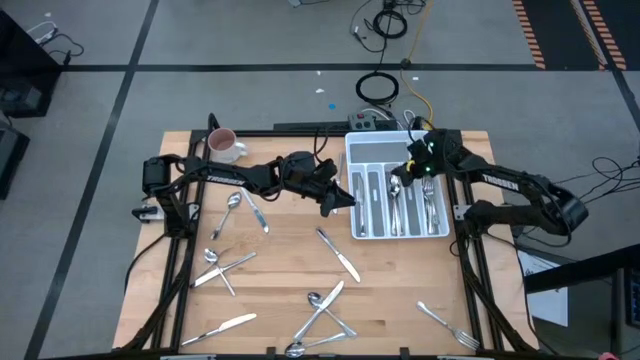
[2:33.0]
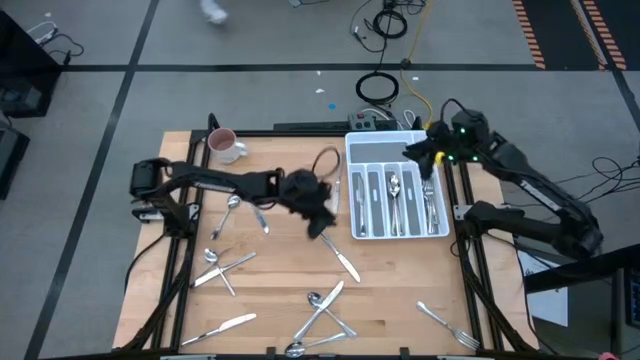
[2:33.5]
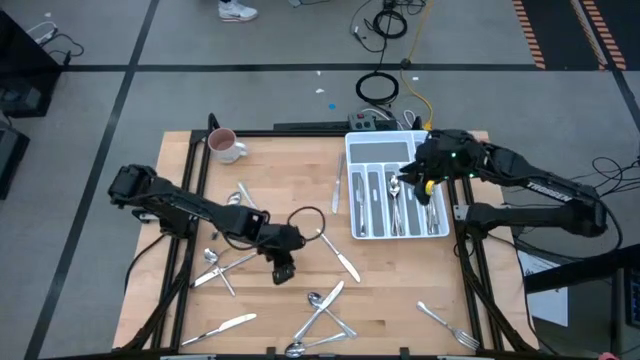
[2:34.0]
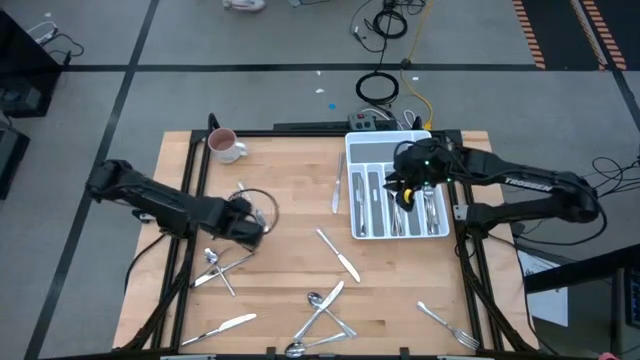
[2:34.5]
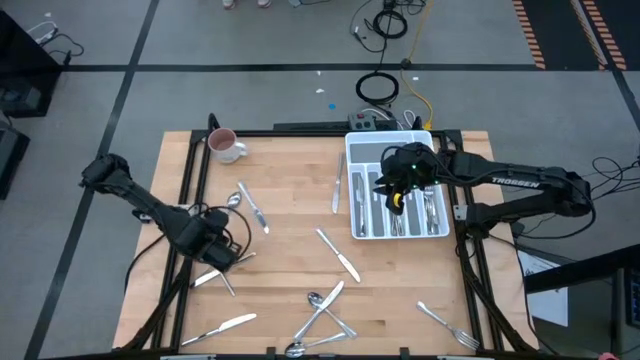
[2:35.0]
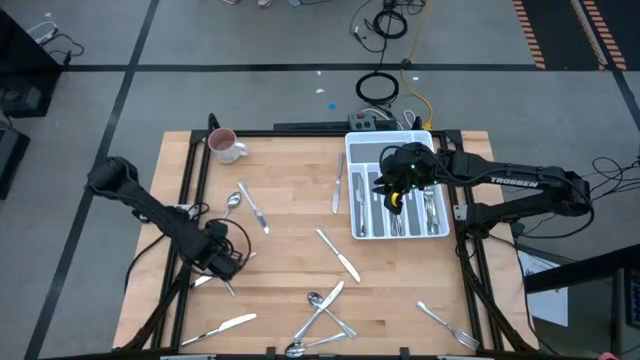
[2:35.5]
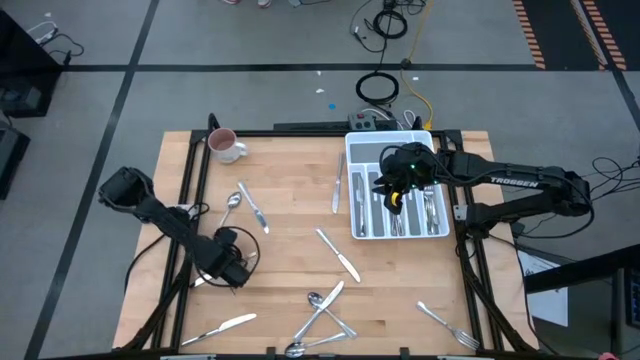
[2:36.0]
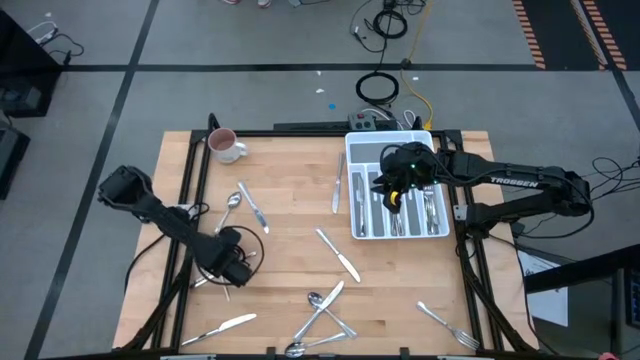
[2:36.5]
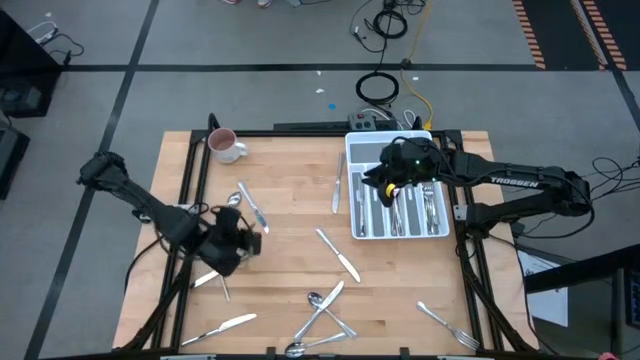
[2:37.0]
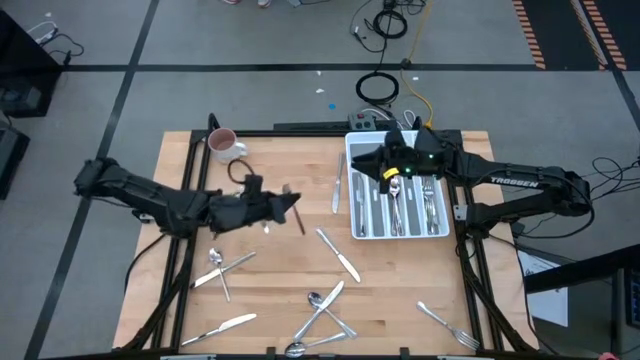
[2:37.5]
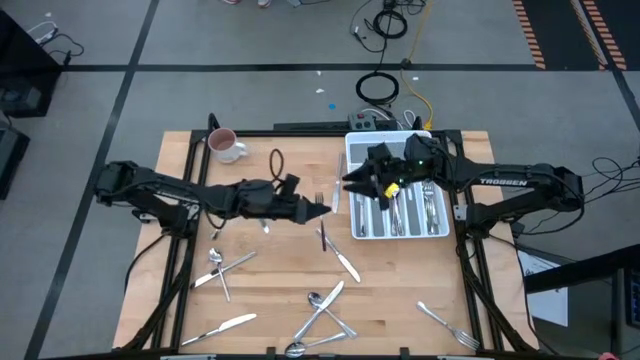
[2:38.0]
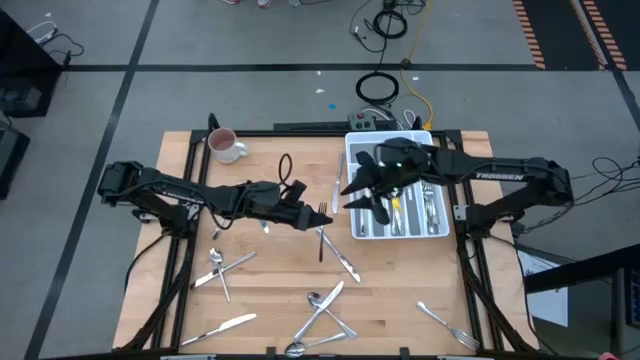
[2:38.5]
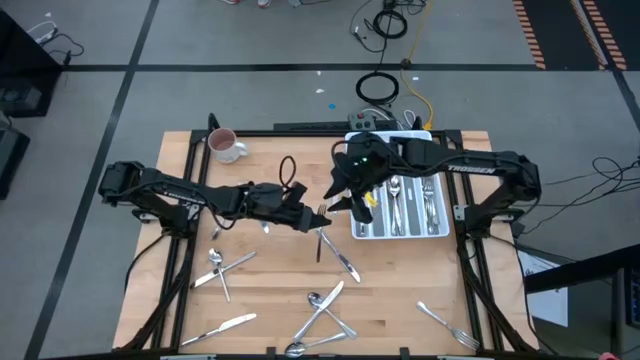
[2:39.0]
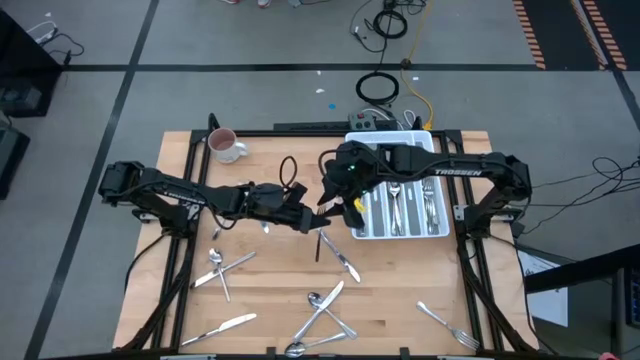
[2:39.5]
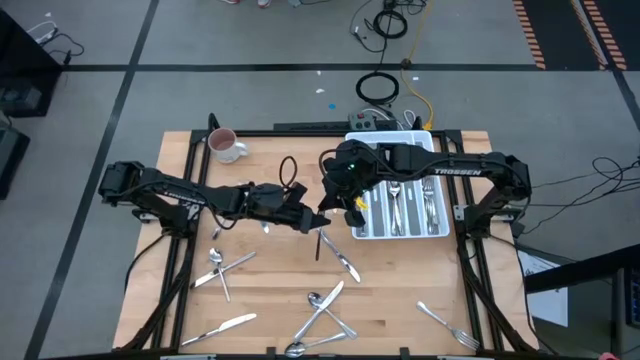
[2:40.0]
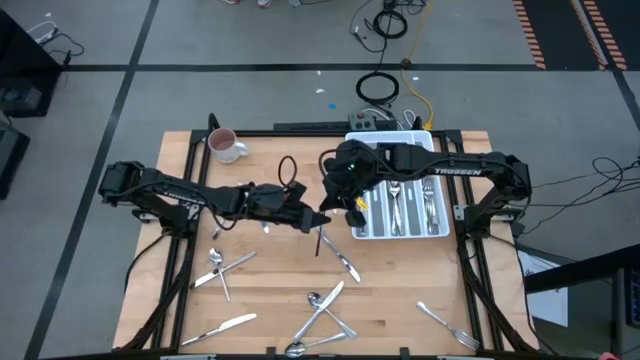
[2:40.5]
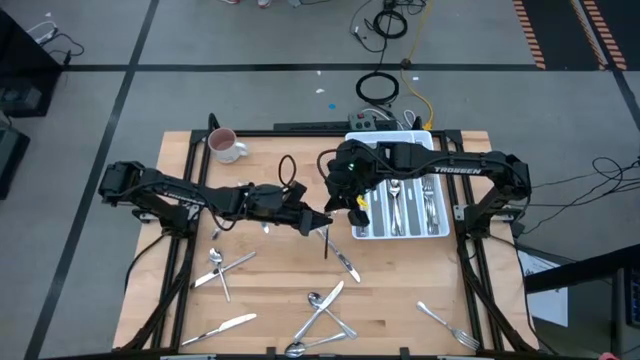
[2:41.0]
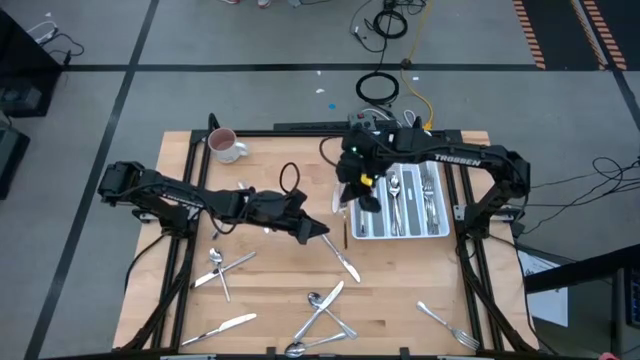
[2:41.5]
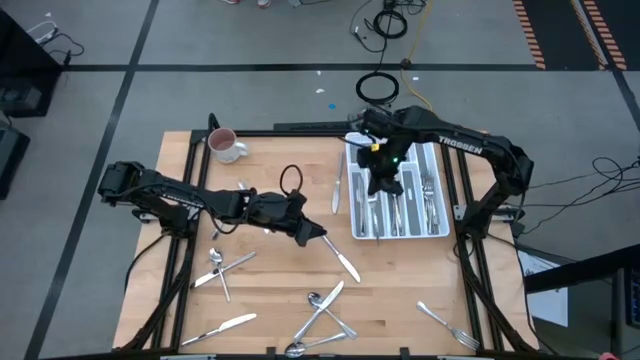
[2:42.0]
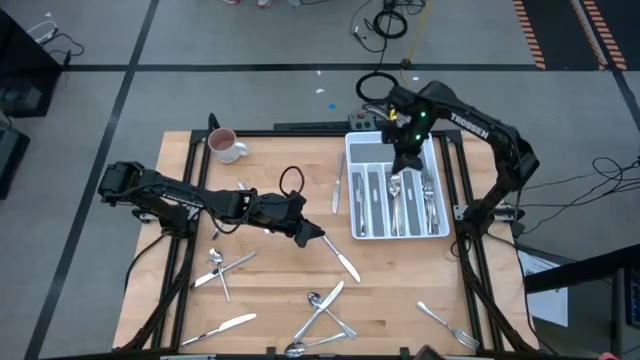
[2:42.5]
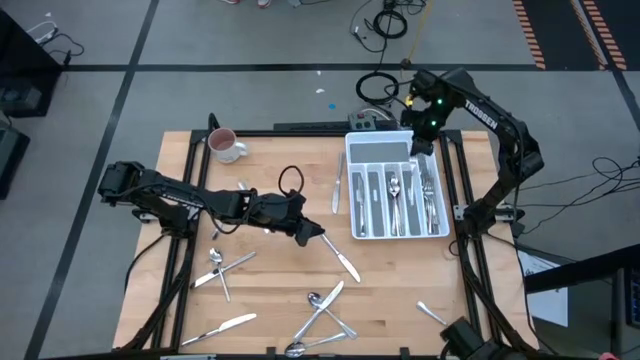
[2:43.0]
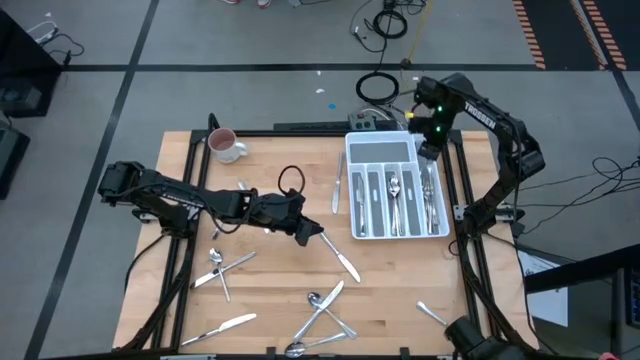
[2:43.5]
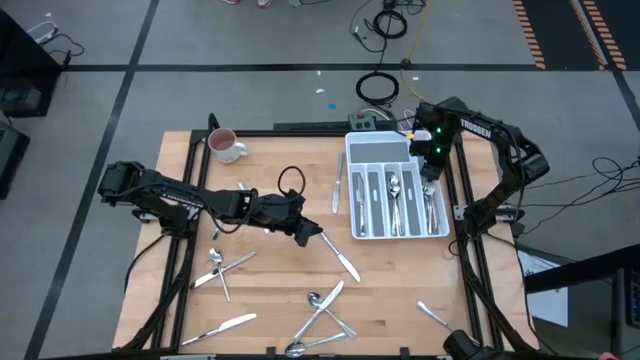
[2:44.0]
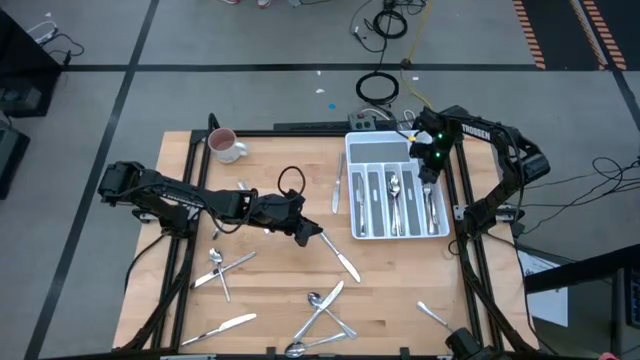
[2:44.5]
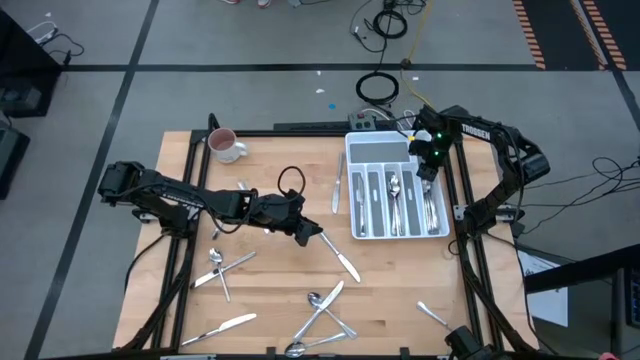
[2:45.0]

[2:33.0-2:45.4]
Task: Sort silverware
Put the left fork in the right section of the silverware tray

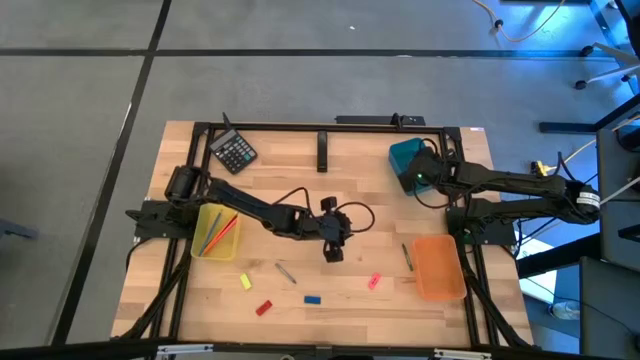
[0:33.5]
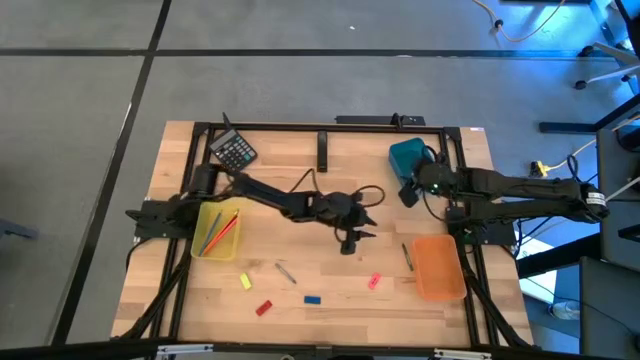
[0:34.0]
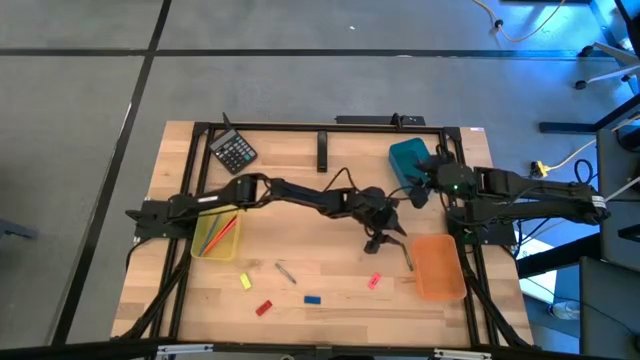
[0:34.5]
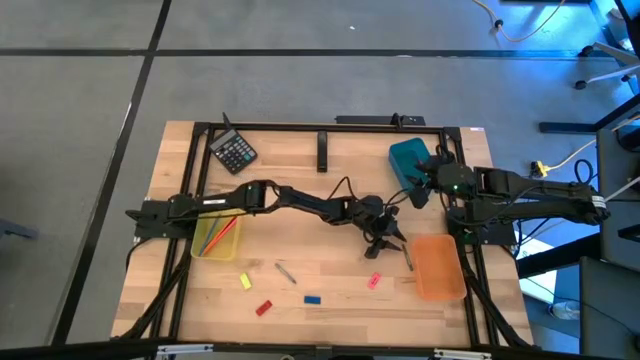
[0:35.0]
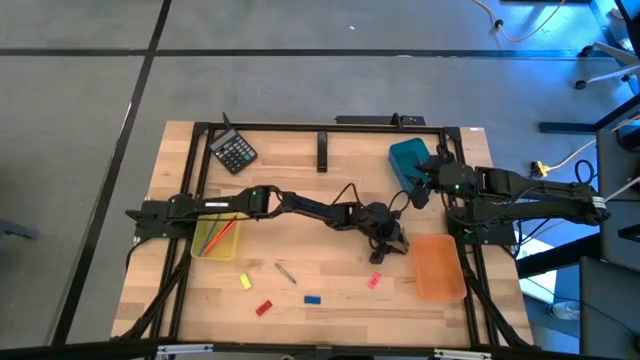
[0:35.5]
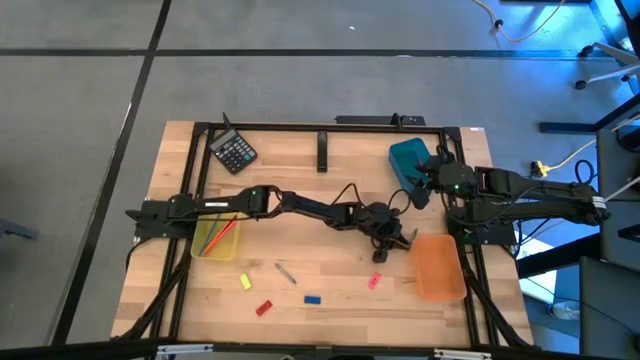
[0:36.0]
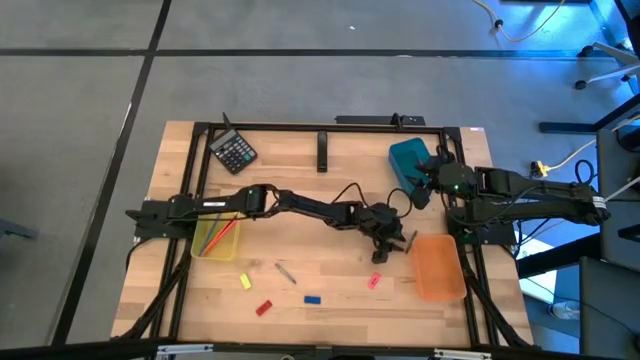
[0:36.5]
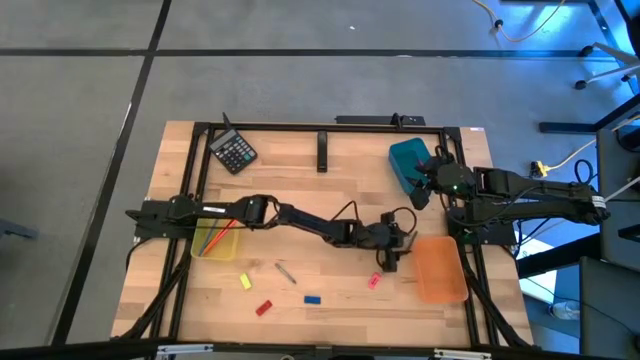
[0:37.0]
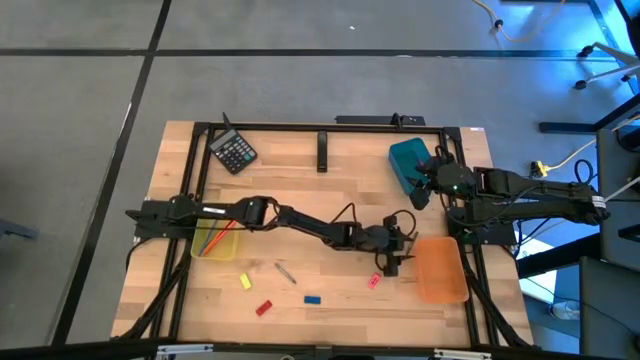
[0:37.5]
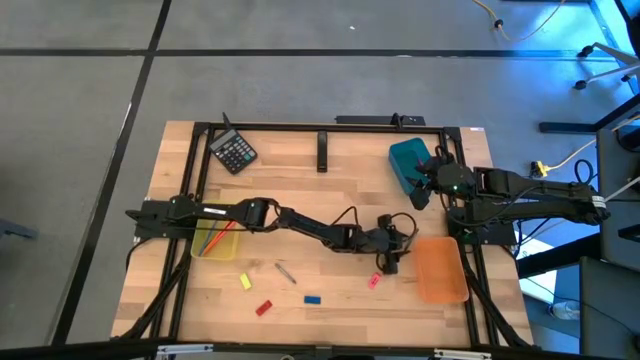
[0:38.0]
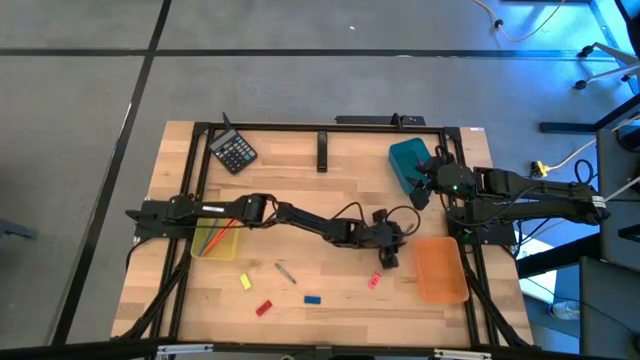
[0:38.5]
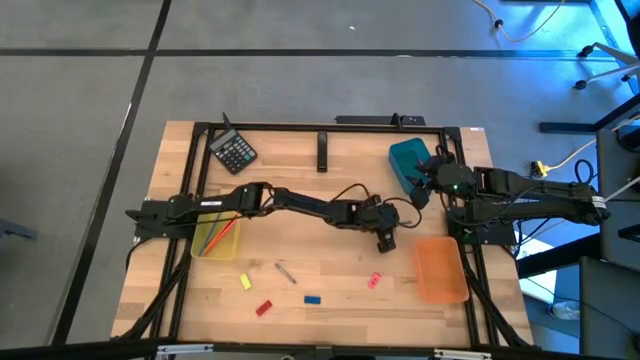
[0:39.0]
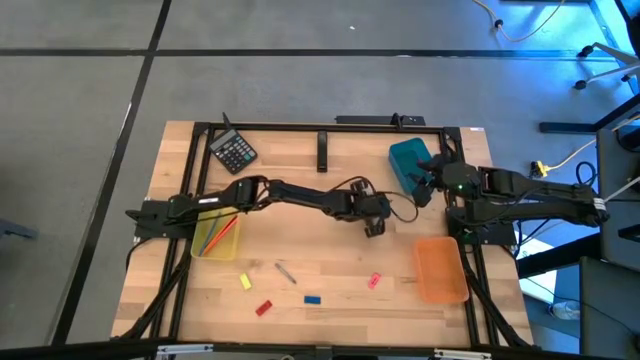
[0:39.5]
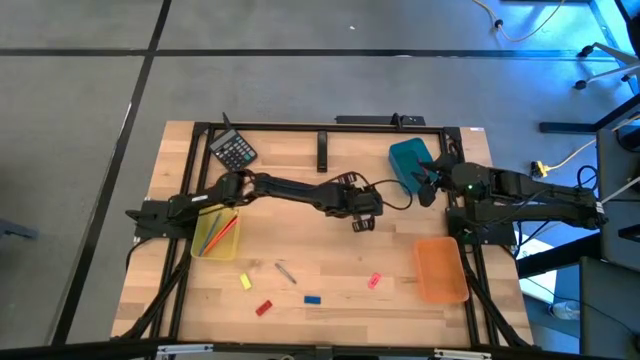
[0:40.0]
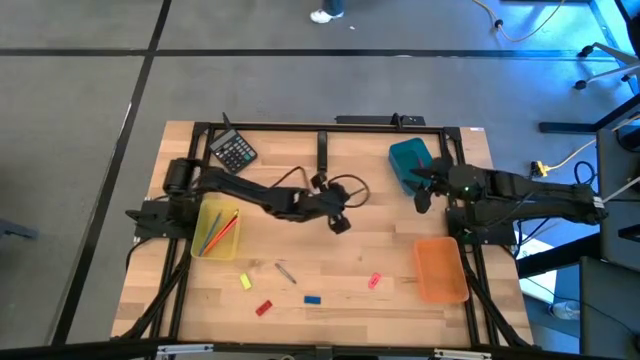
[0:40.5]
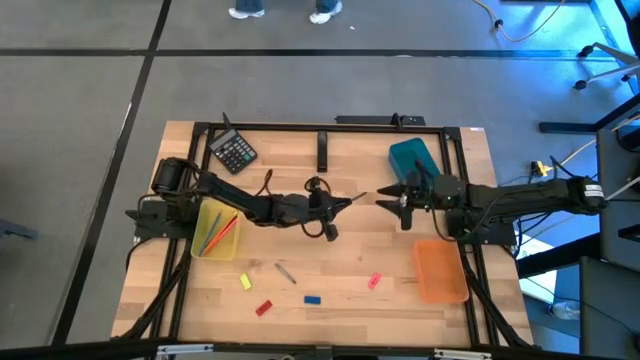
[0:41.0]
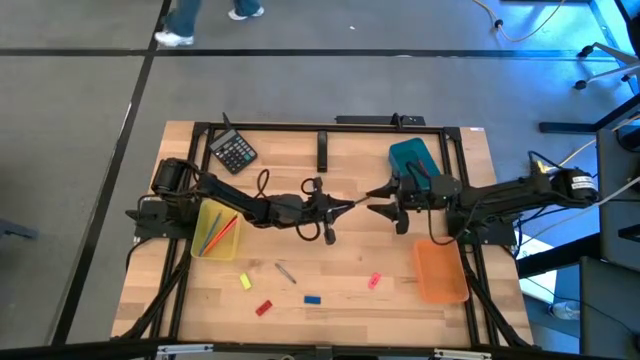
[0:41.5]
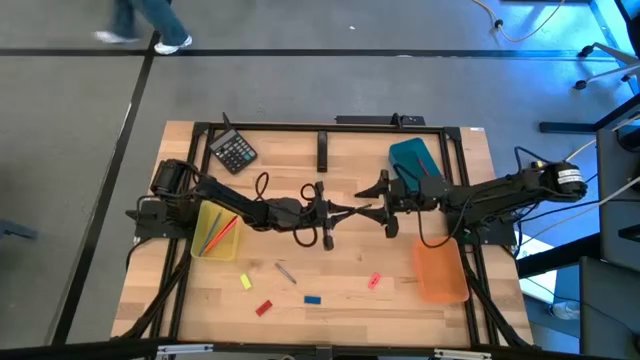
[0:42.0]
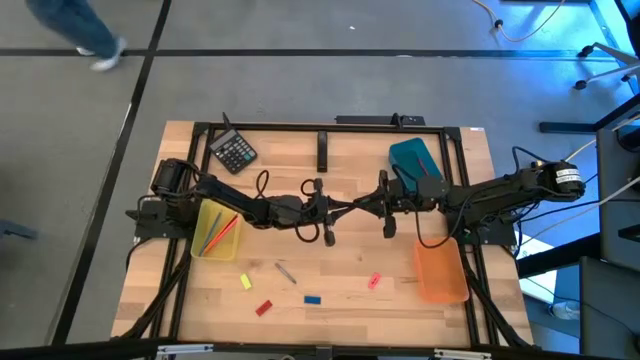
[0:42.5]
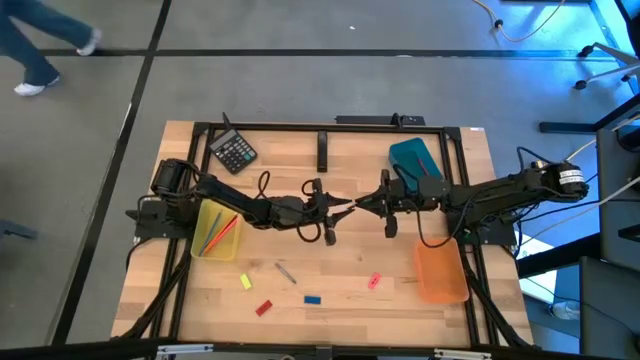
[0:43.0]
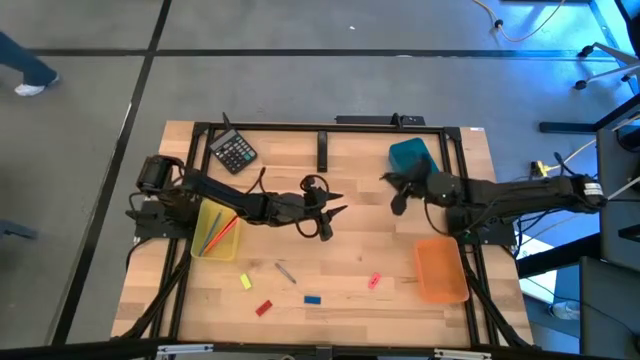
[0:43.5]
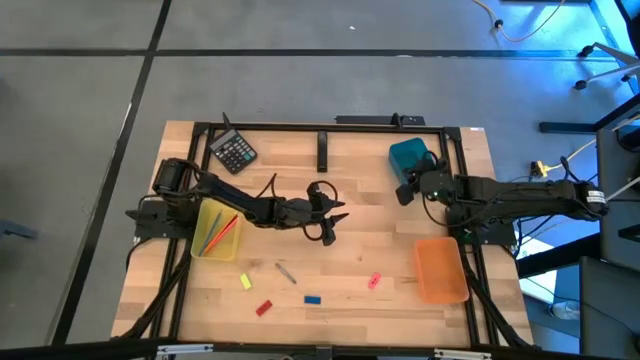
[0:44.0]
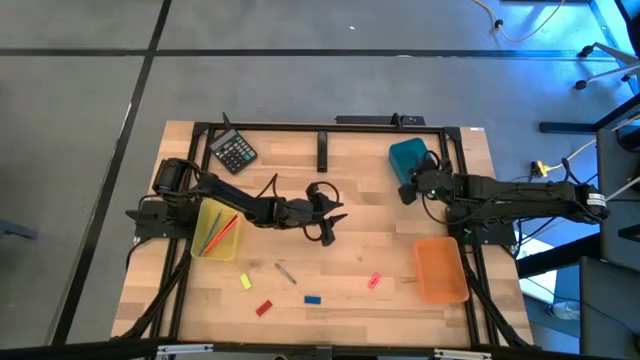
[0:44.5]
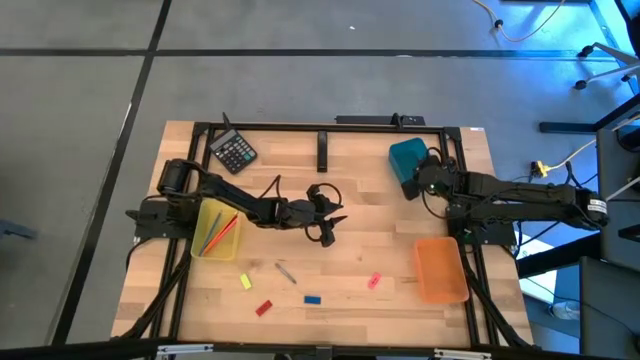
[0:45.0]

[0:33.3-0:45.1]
Task: Sort crayons/erasers/pens/pencils in bins
Put the green crayon into the blue bin
